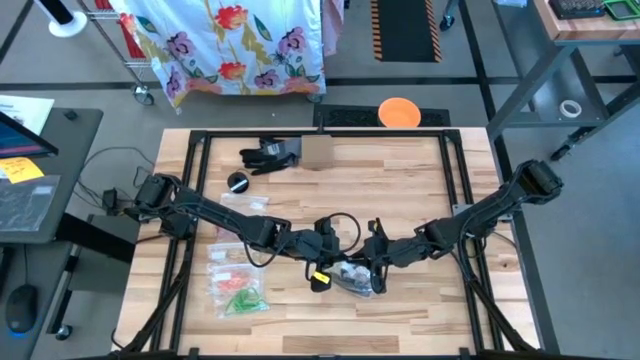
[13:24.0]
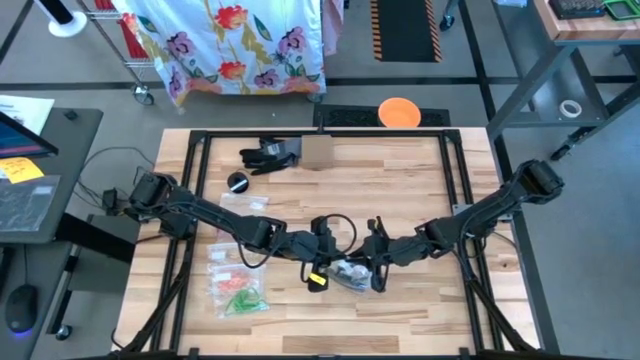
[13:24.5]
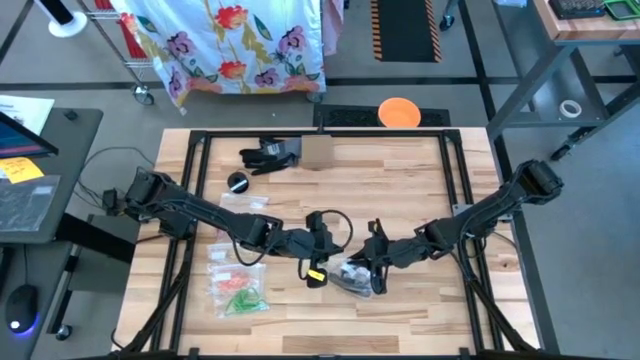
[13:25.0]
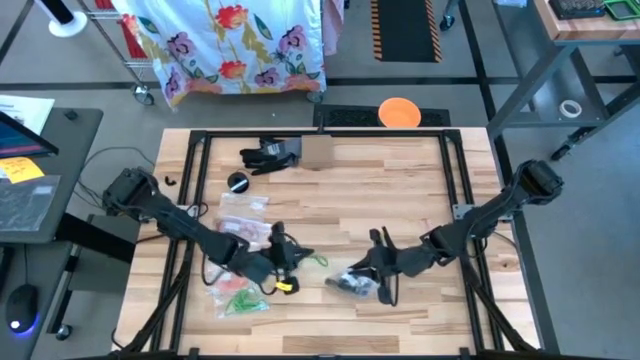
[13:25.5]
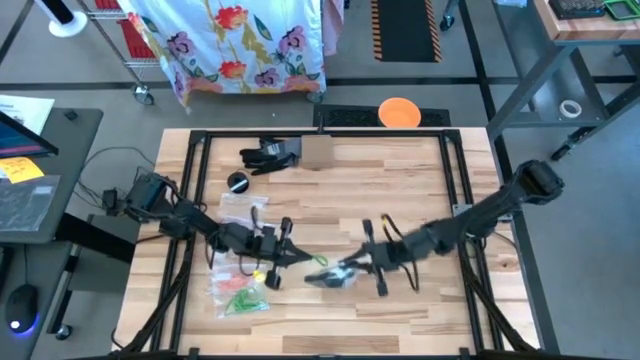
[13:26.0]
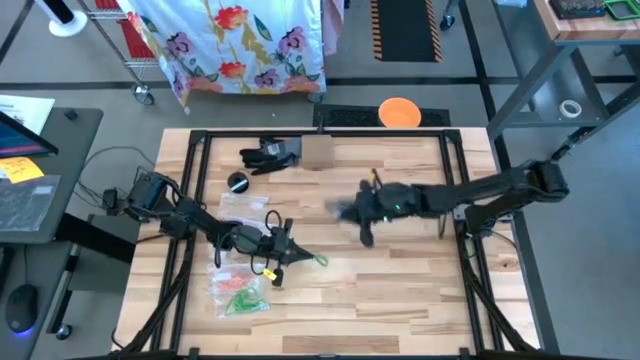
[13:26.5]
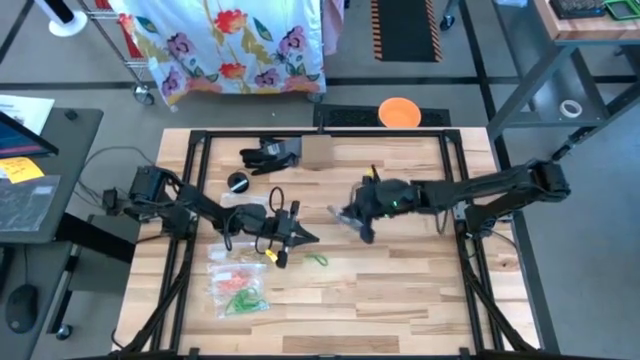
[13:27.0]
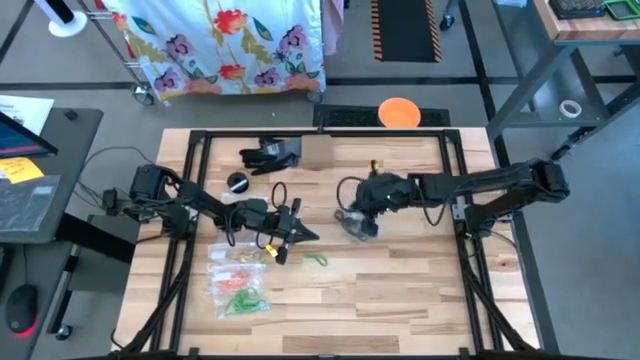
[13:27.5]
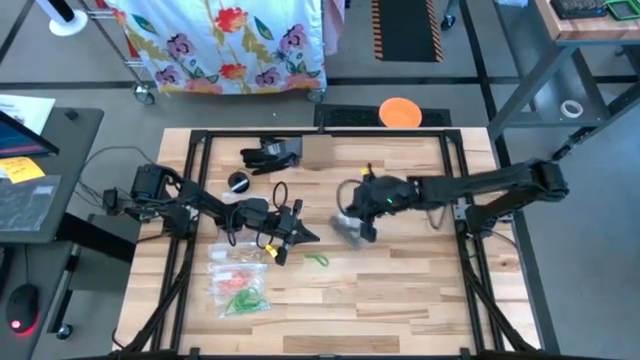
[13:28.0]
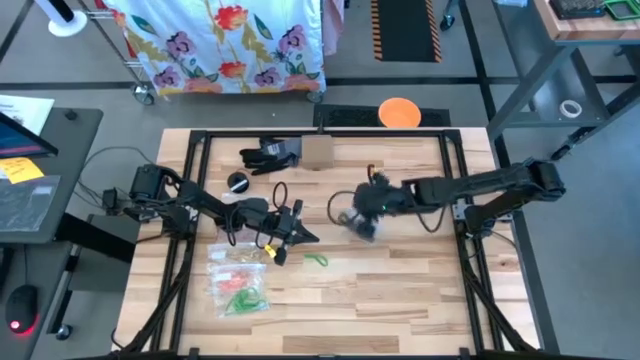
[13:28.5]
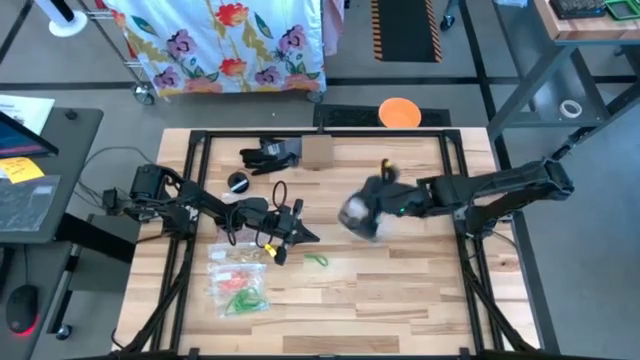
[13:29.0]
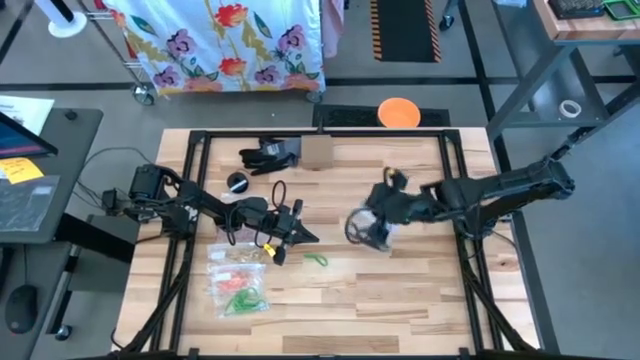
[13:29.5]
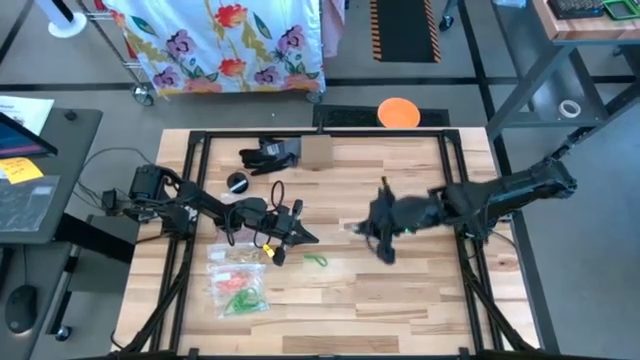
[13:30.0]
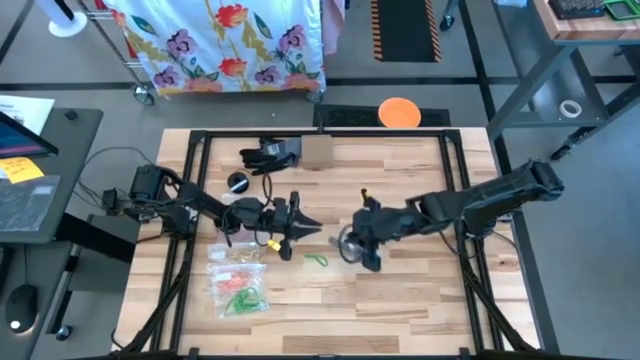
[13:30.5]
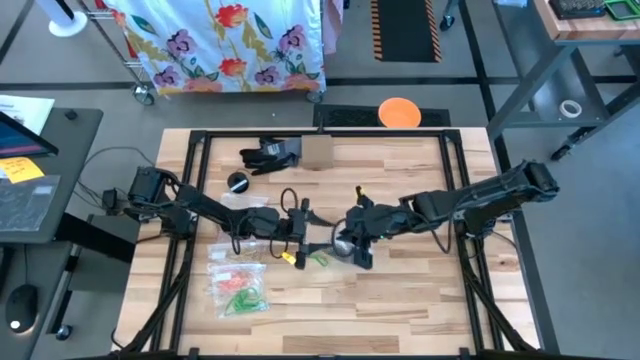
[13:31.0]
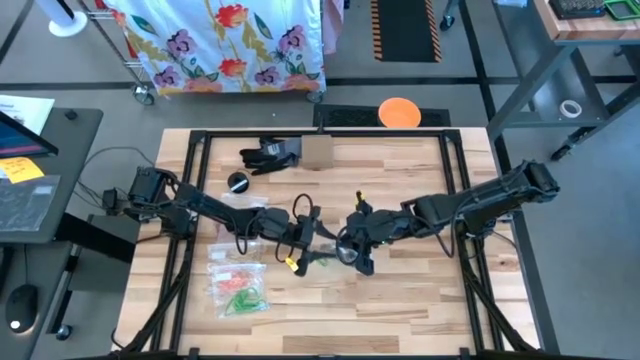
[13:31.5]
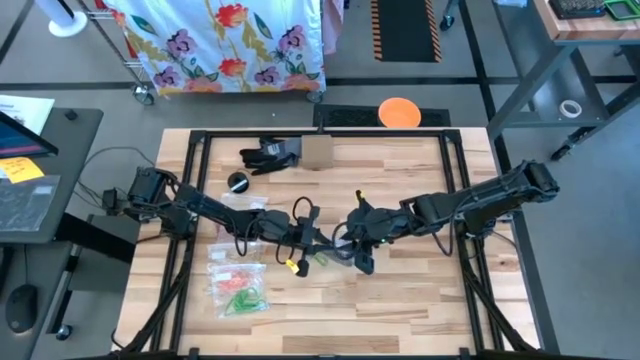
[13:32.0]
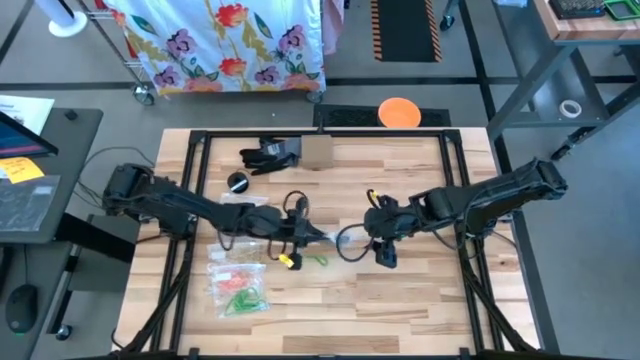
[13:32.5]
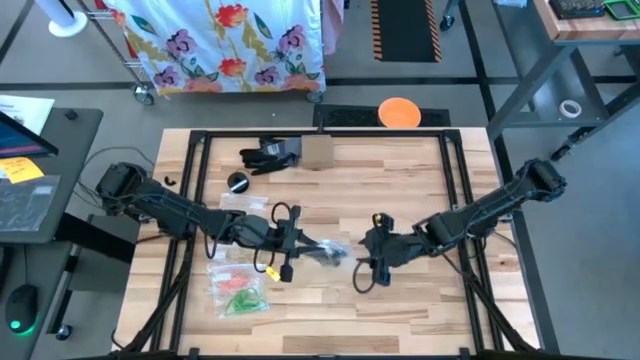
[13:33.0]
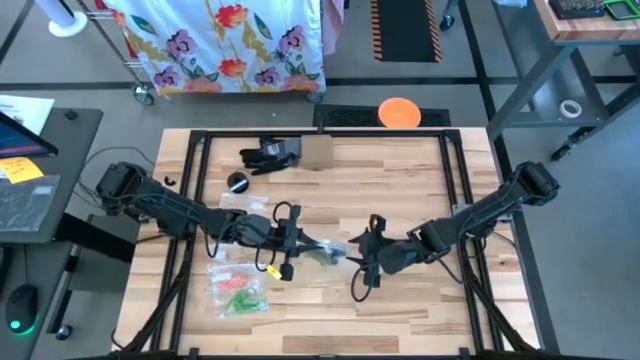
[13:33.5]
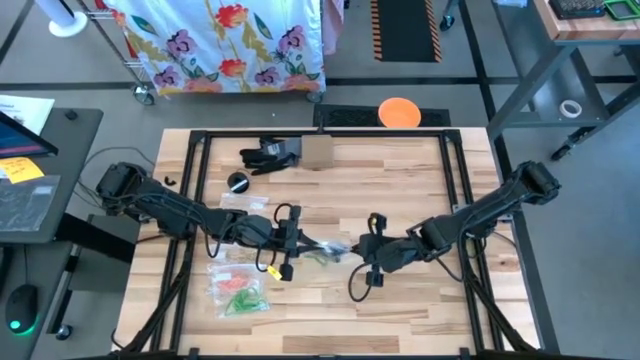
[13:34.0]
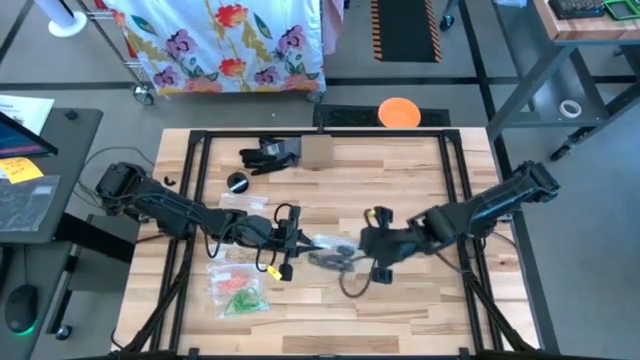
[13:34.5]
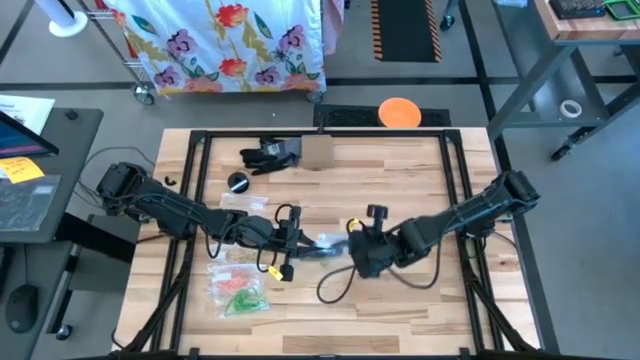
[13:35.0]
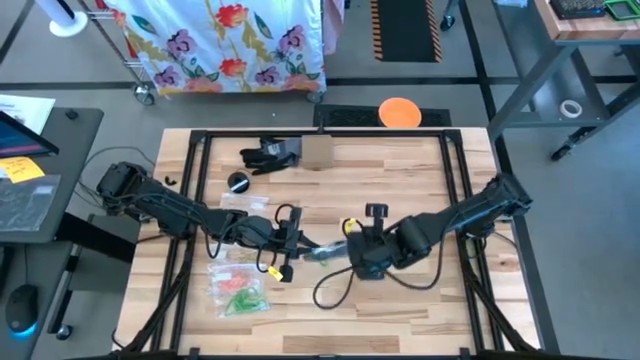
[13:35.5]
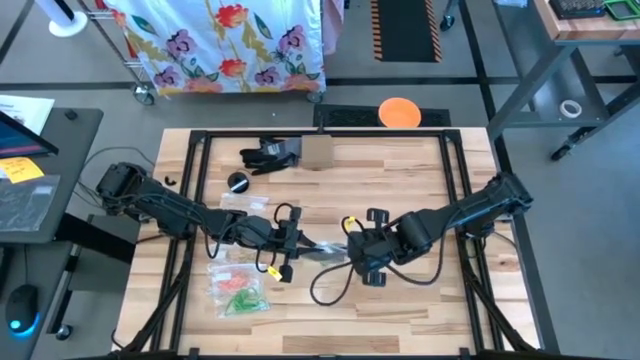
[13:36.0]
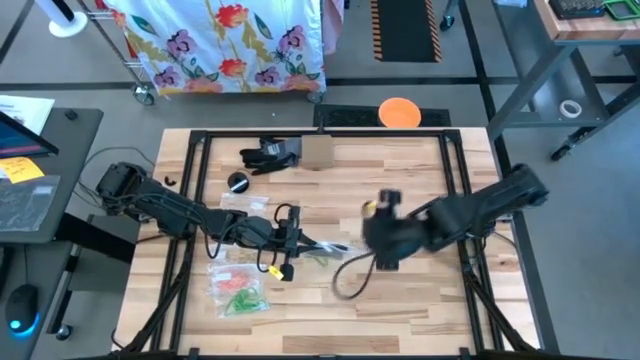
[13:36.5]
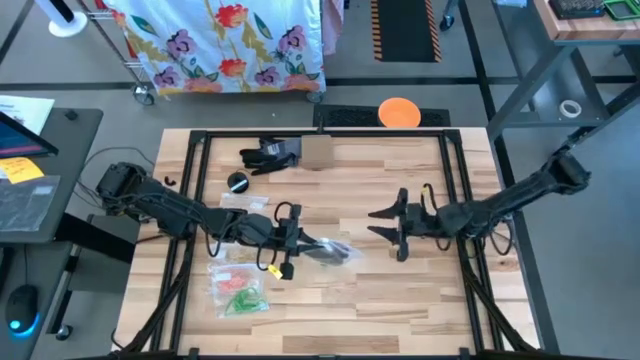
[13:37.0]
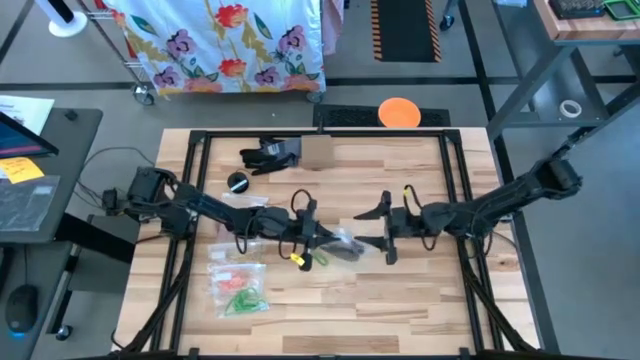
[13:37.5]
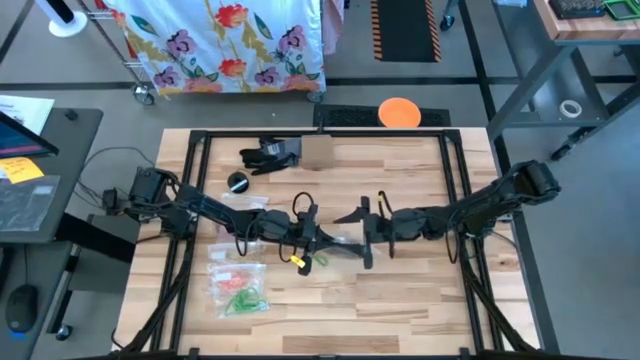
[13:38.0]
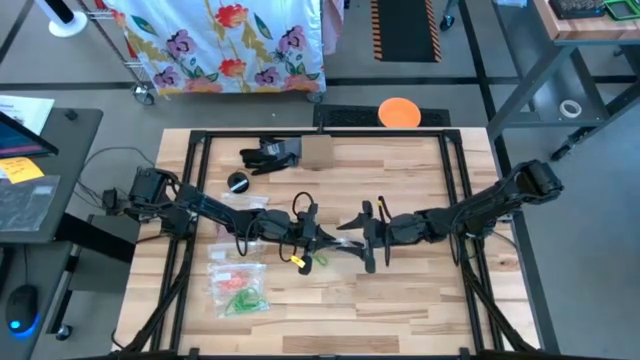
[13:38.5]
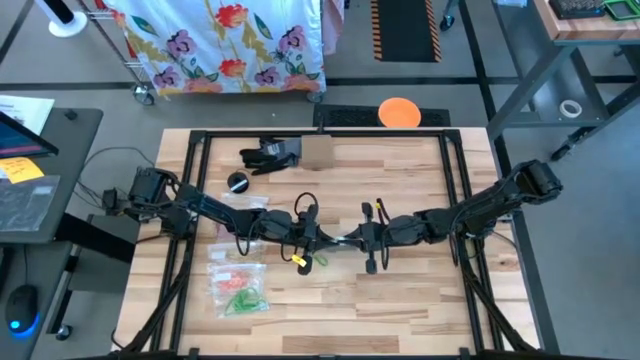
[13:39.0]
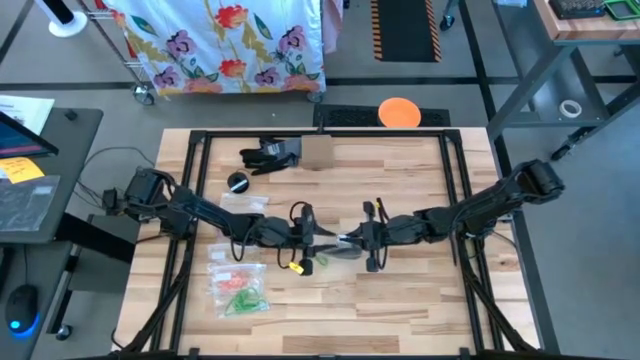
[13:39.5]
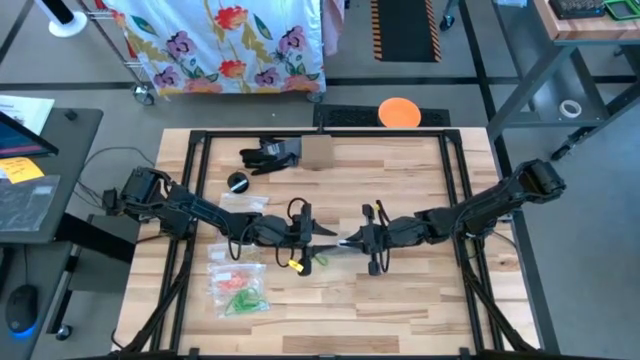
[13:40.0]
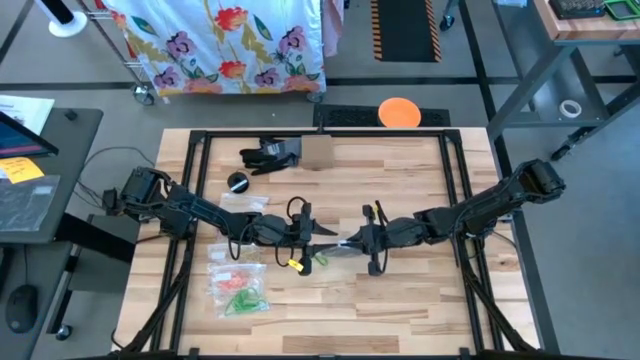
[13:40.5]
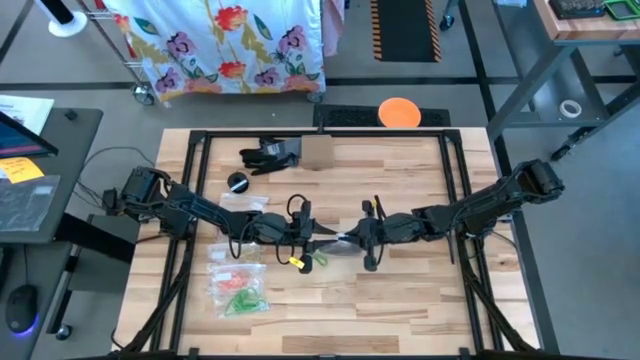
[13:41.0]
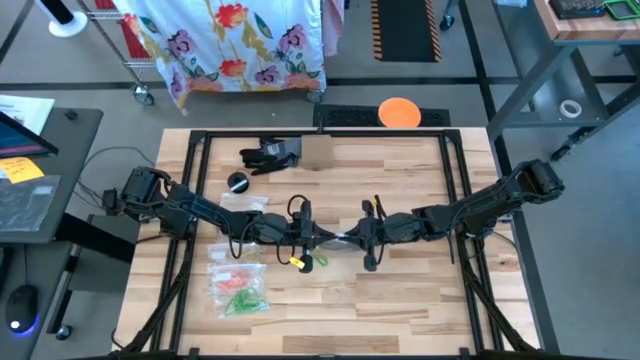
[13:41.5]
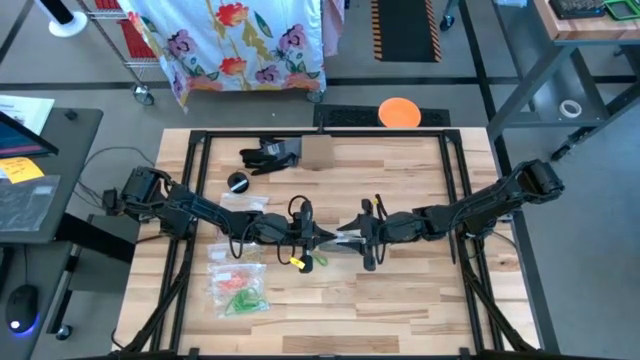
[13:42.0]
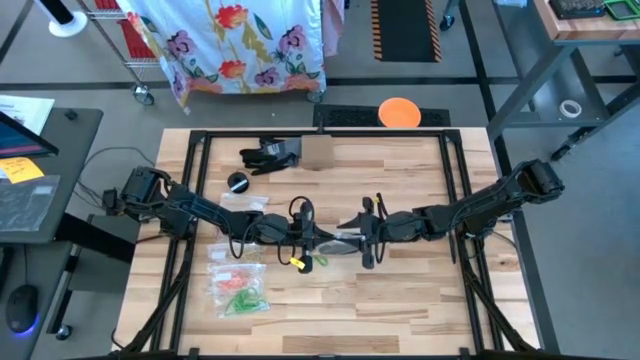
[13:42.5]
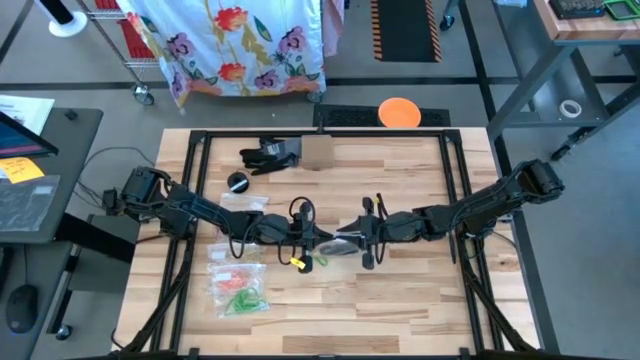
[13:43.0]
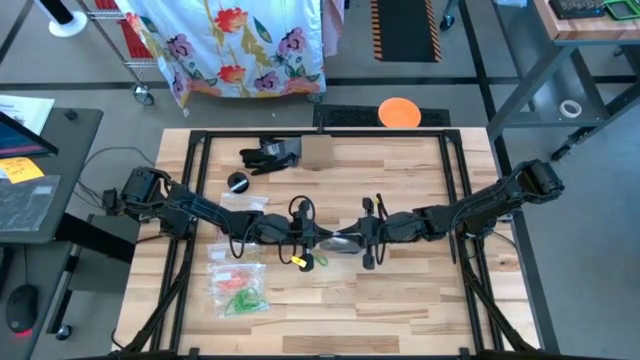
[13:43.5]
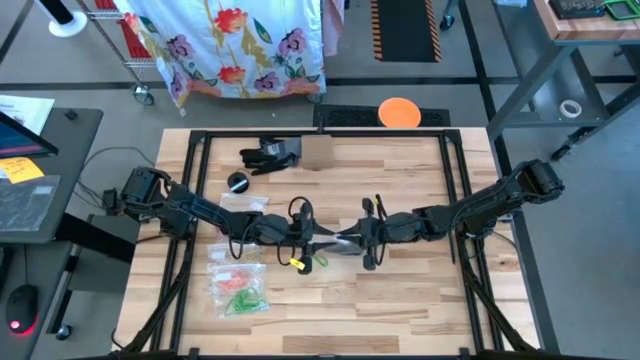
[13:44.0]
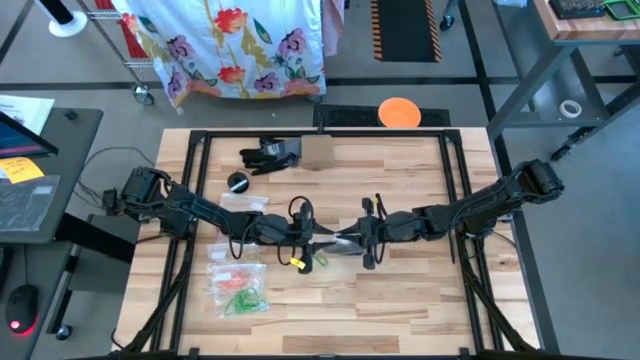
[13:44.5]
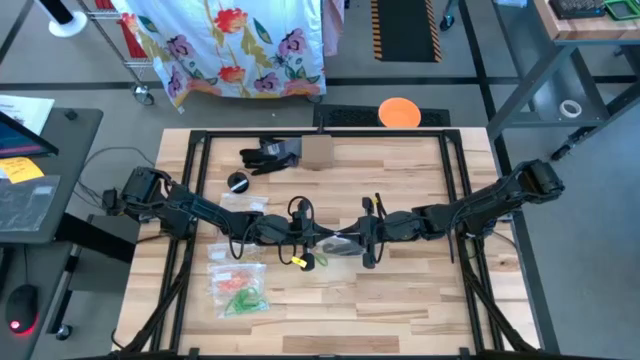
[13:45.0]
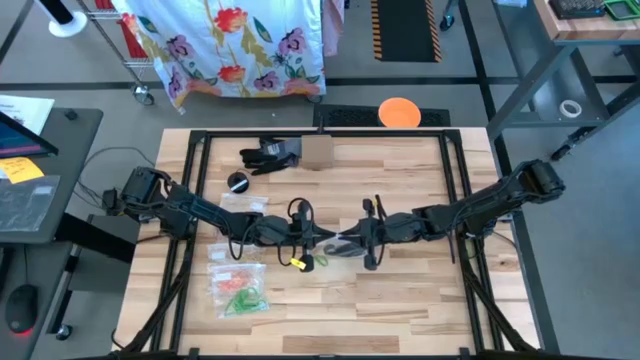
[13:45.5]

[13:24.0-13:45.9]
Task: Sort rubber bands
Close the transparent zip bag
